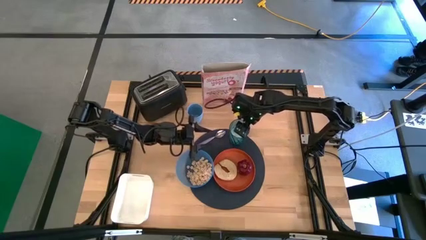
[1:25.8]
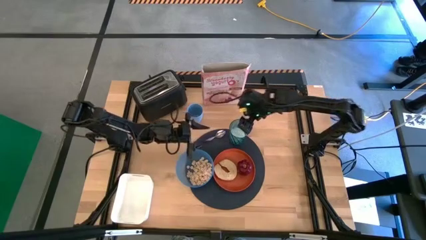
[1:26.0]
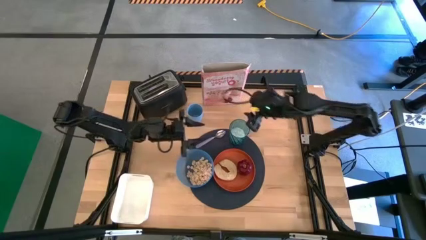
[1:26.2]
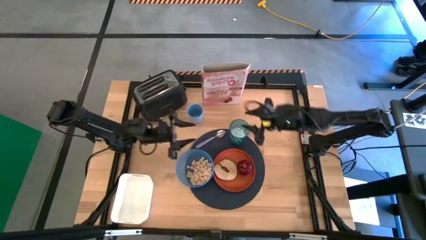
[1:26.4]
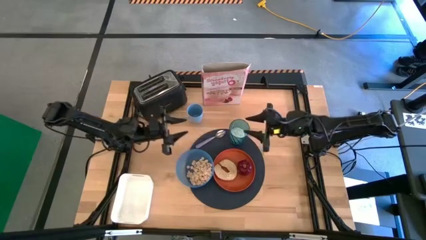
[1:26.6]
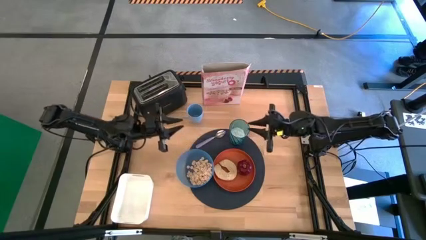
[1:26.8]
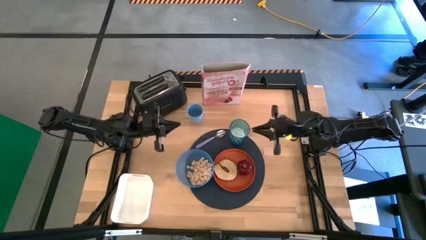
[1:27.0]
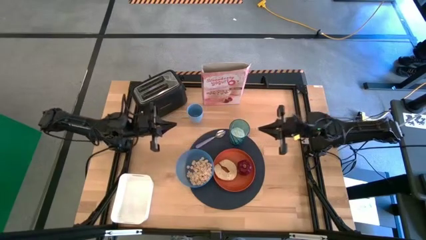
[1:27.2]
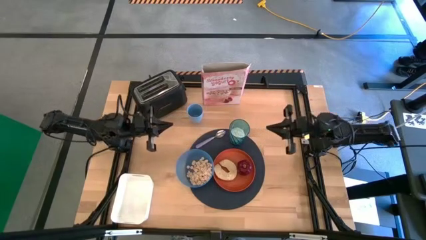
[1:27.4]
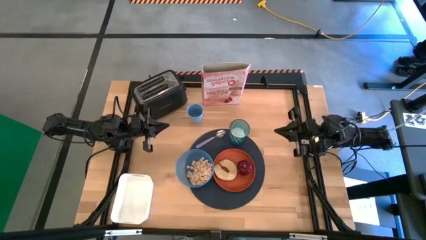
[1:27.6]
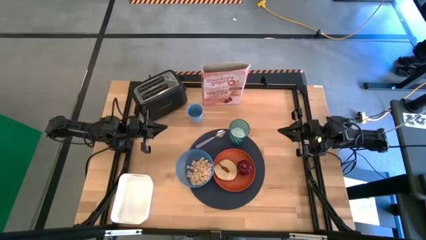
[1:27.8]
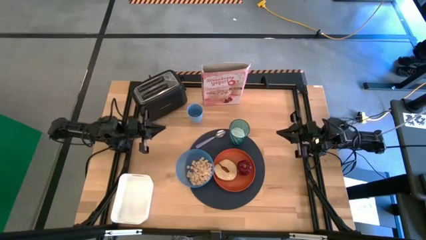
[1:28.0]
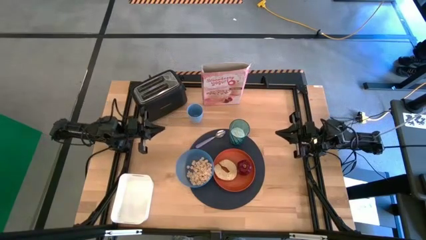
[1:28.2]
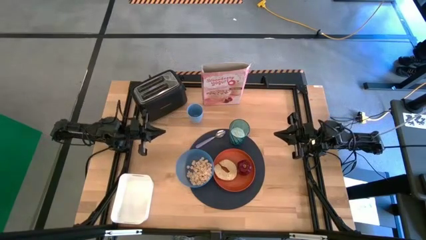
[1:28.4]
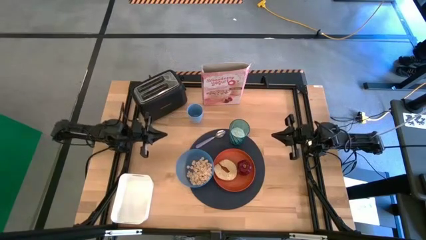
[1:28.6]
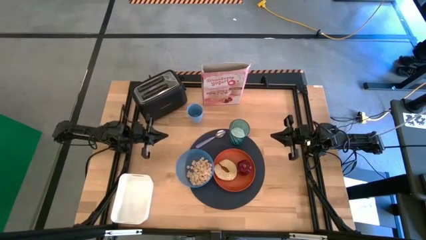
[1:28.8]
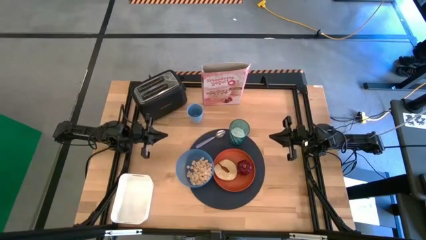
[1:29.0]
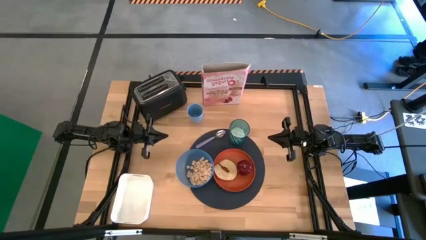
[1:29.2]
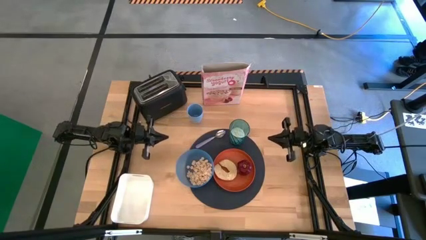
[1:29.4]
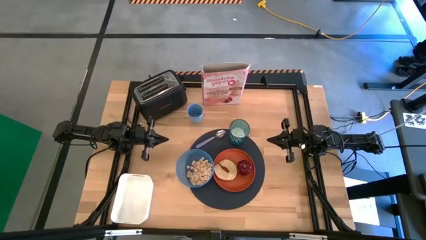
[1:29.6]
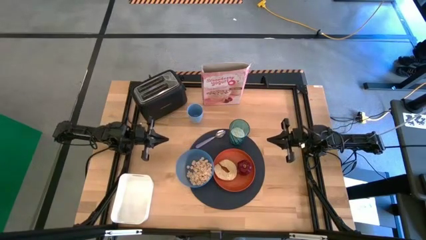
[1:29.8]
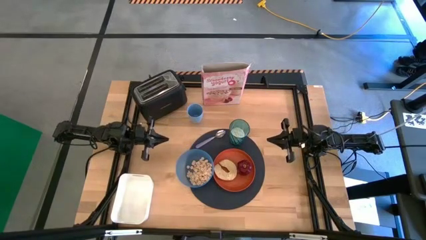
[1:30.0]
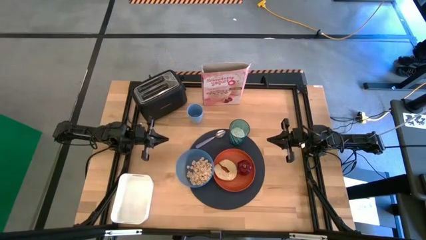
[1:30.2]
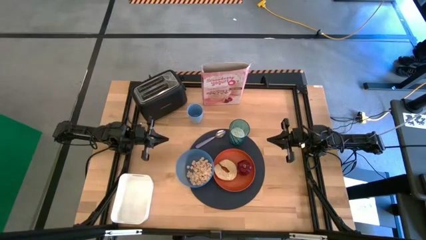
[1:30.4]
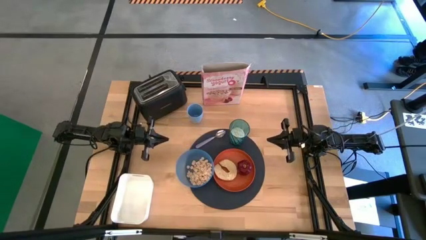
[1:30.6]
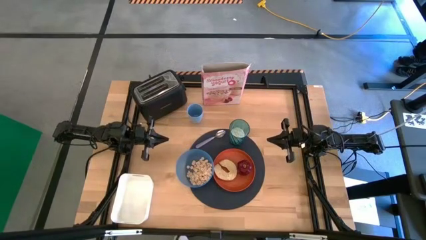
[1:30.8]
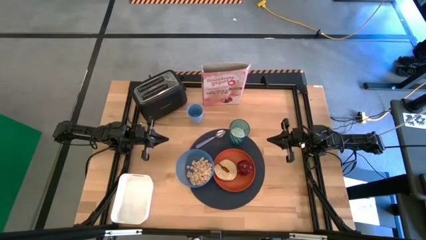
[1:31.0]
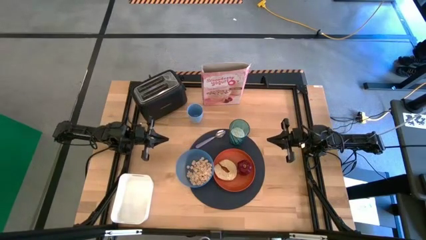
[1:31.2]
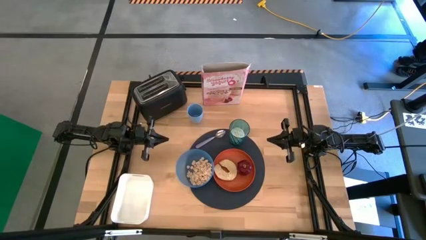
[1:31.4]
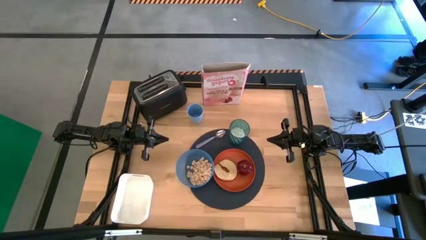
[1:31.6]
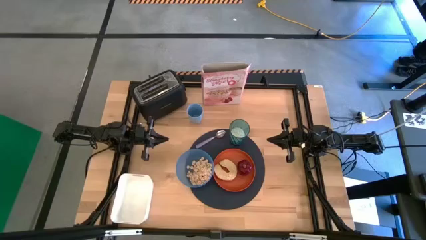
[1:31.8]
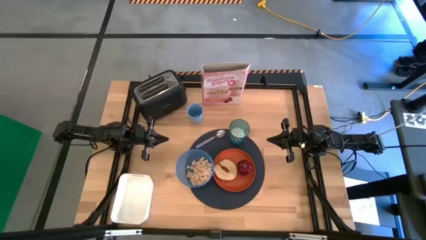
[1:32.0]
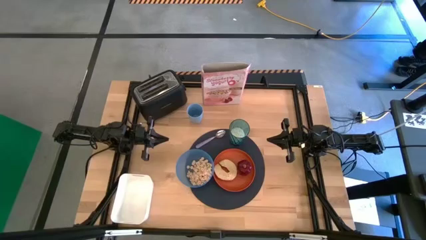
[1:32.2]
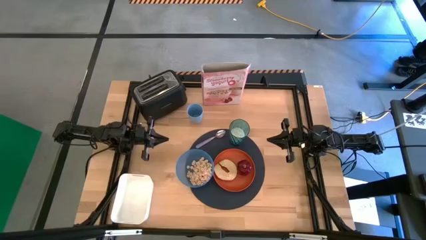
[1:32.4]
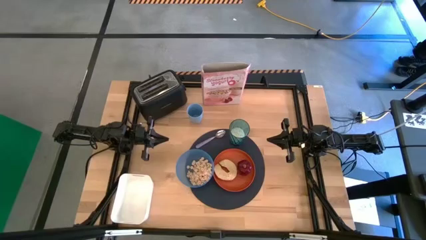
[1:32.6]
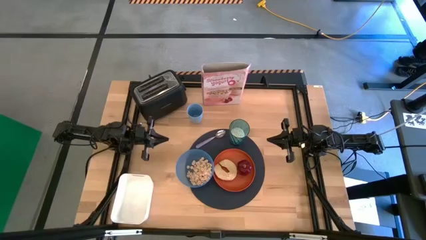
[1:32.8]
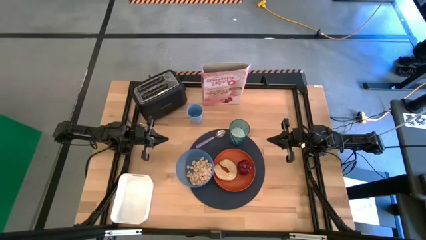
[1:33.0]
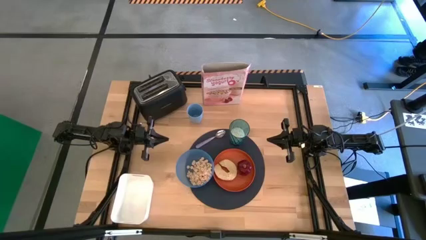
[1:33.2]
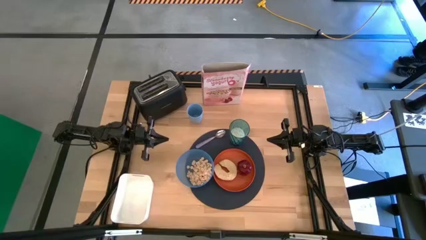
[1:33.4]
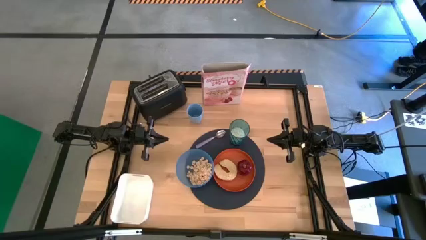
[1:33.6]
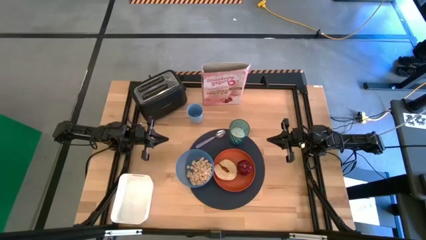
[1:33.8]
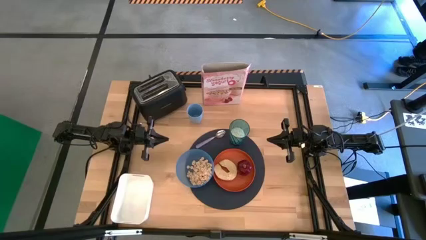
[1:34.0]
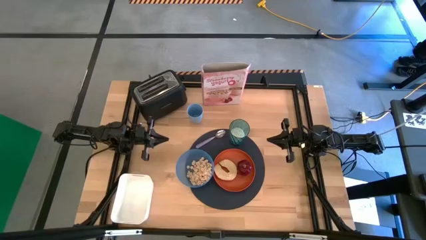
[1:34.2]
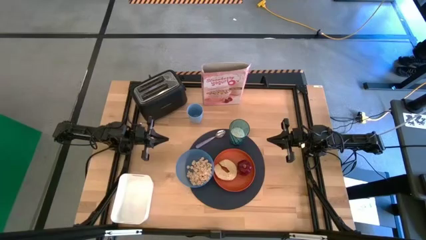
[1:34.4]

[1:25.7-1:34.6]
Task: Arrange a breakfast setting
Return To Home Position

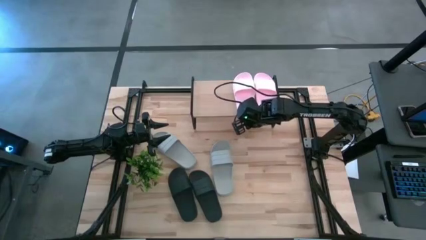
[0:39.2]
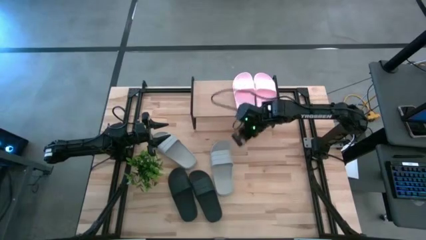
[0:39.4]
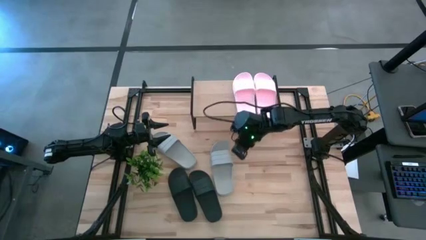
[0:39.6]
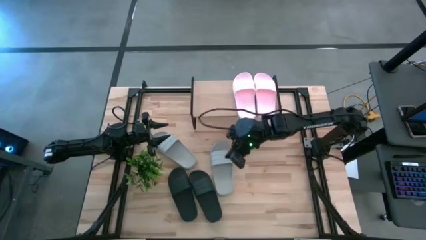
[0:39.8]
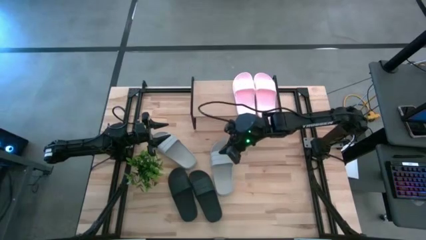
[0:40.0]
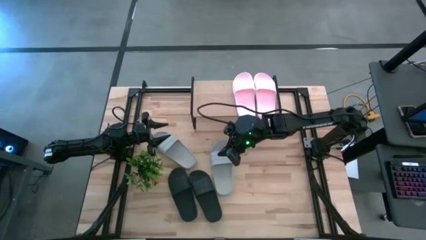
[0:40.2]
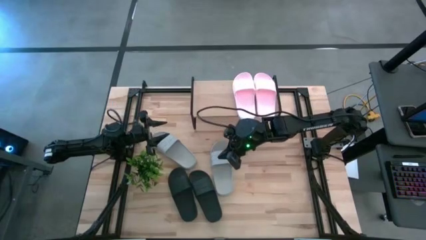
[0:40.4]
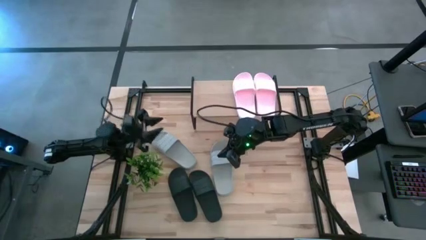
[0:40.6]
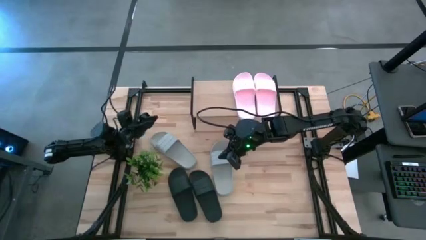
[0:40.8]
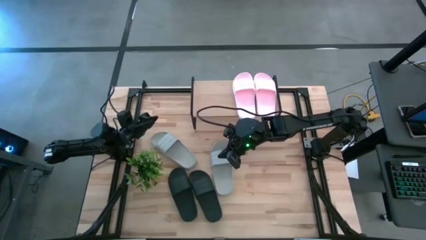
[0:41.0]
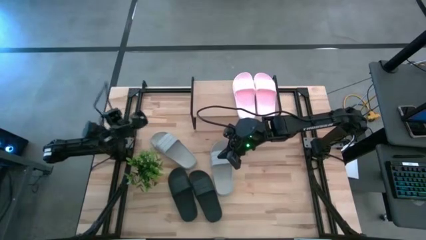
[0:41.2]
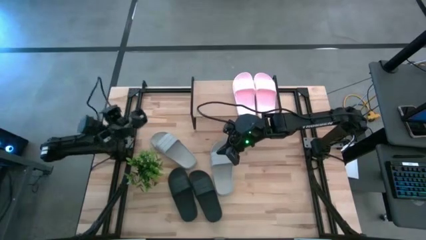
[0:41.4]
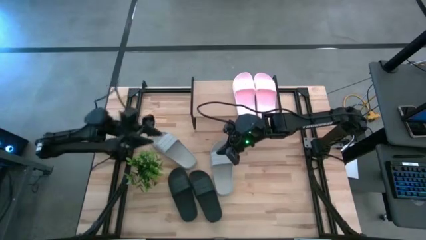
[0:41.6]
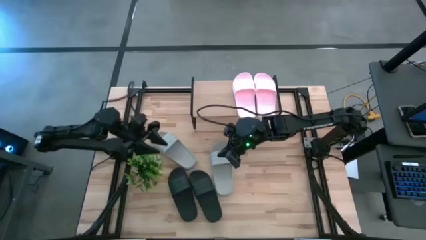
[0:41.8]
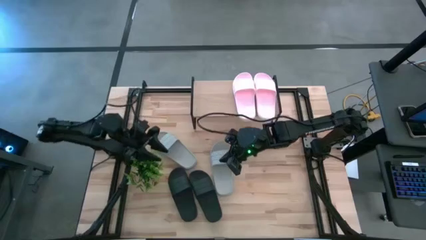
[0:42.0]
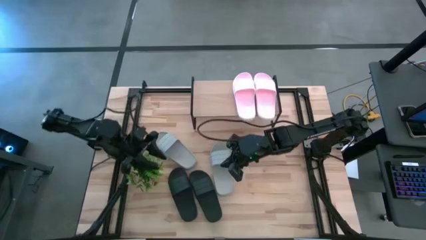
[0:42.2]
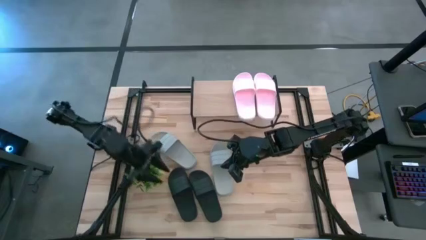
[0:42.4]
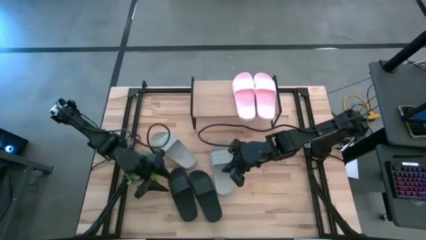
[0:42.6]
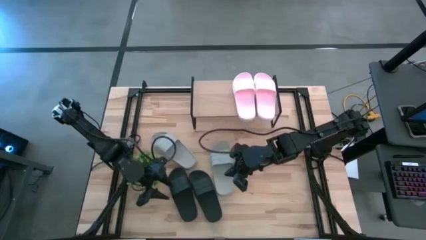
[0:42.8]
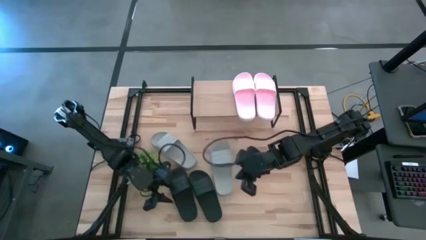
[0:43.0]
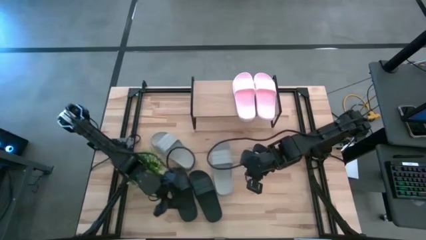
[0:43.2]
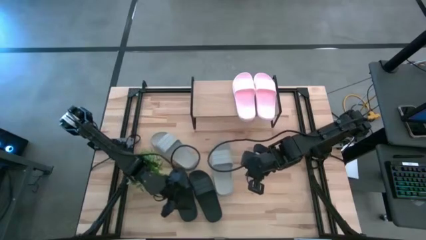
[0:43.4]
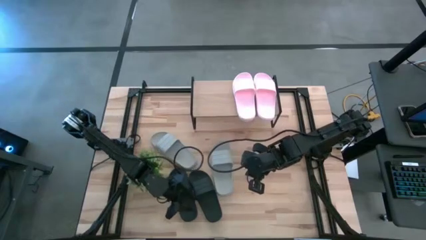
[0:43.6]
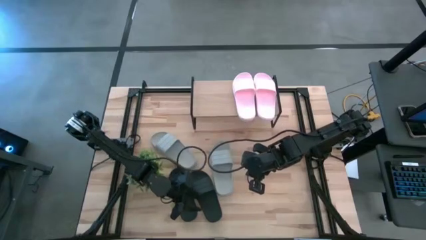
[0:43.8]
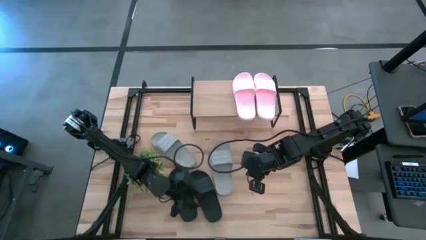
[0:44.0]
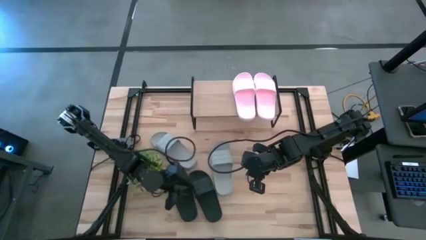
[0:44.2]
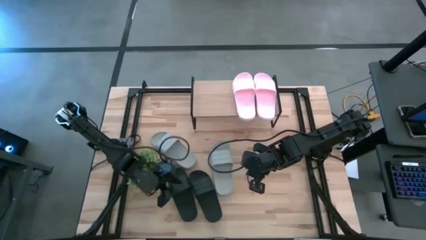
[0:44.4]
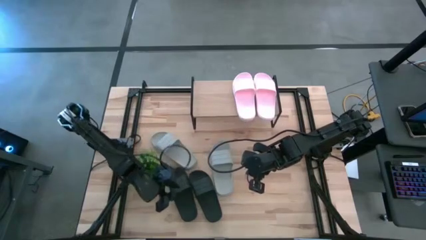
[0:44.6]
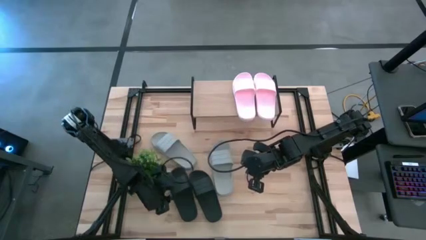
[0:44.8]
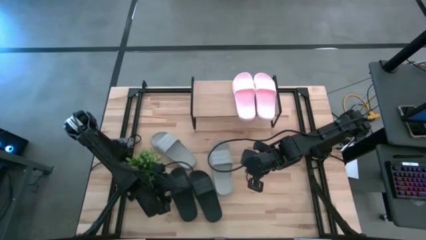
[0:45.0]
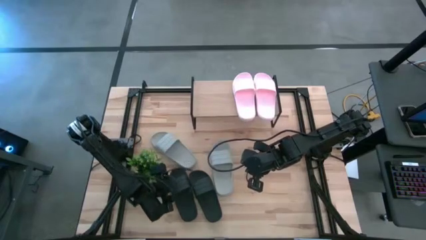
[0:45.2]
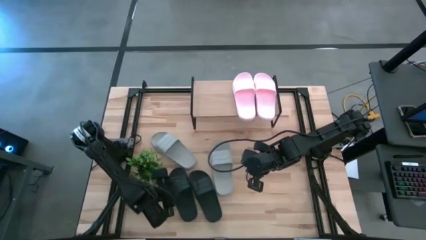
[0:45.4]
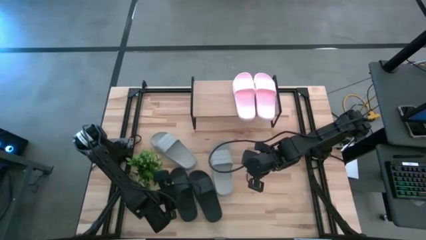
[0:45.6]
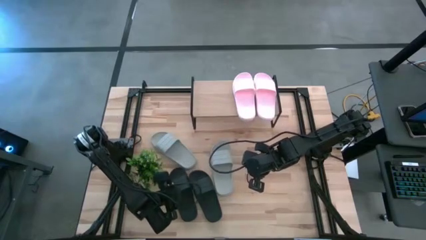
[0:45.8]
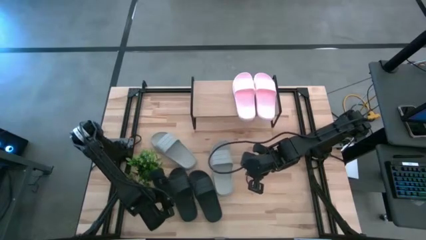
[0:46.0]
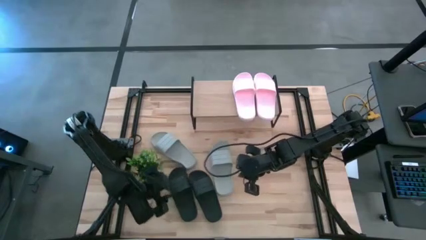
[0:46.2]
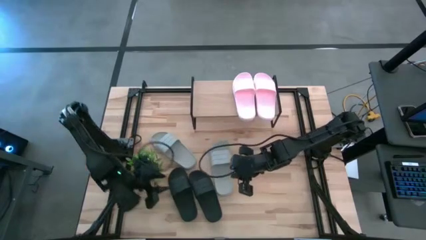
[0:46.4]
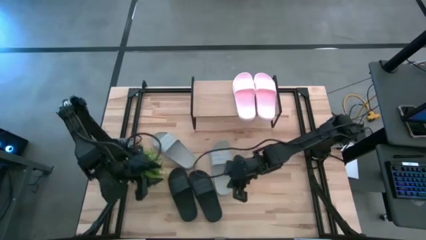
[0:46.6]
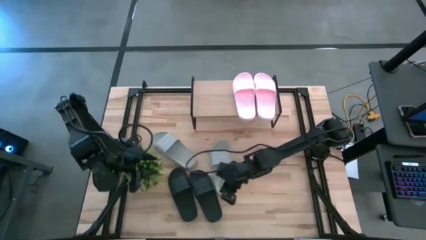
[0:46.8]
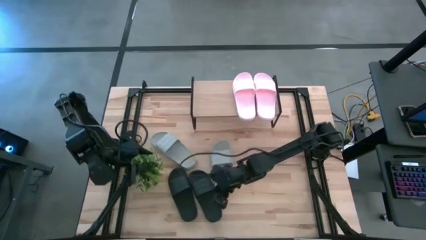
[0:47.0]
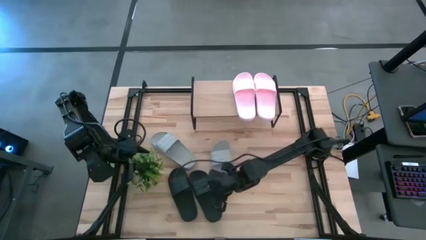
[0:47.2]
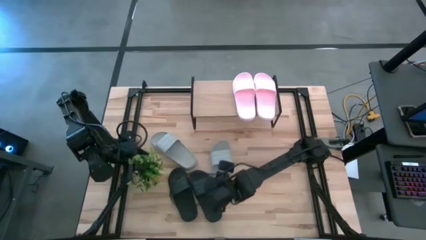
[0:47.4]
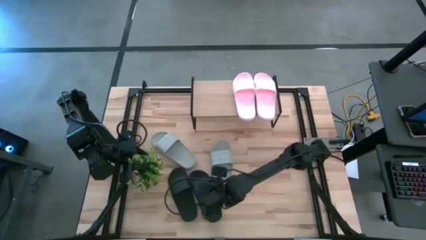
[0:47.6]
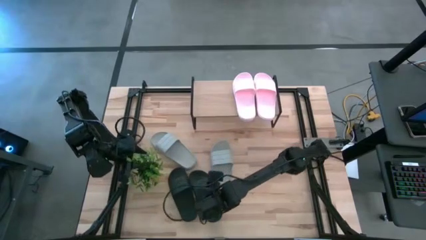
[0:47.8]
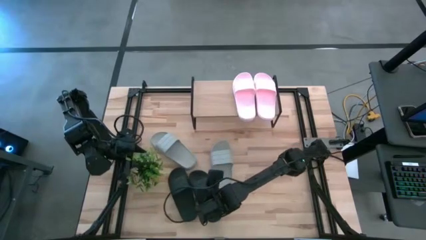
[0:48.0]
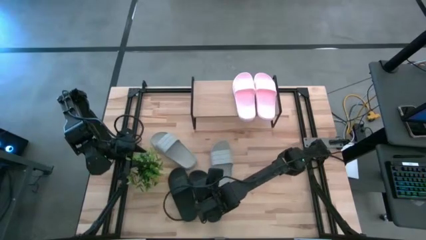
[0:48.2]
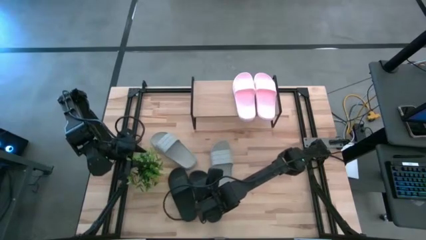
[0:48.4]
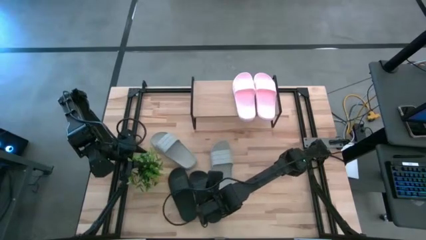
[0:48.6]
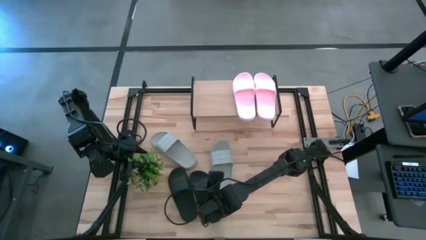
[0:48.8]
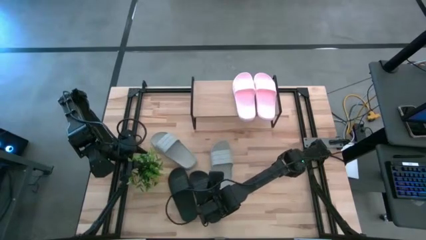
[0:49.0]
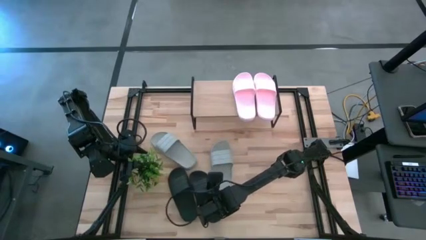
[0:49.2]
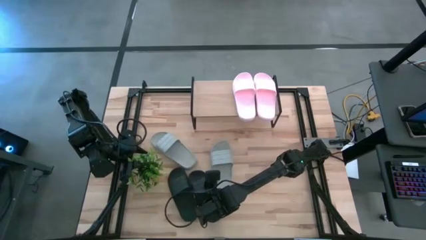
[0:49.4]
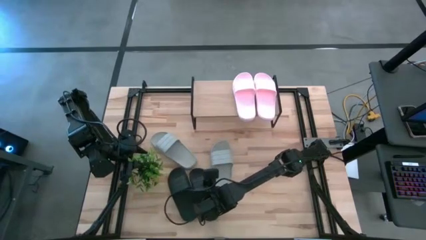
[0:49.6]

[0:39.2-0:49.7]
Task: Pick and place slides into the shelf
Put the right black slide on the shelf
